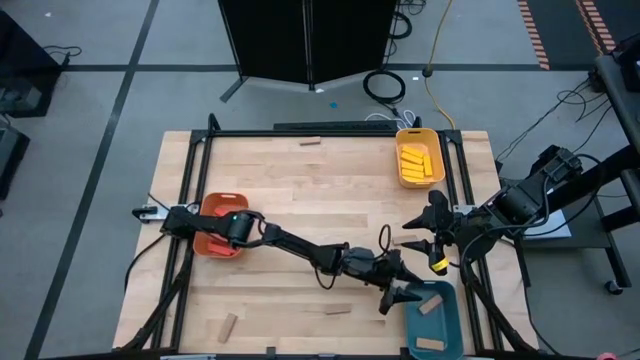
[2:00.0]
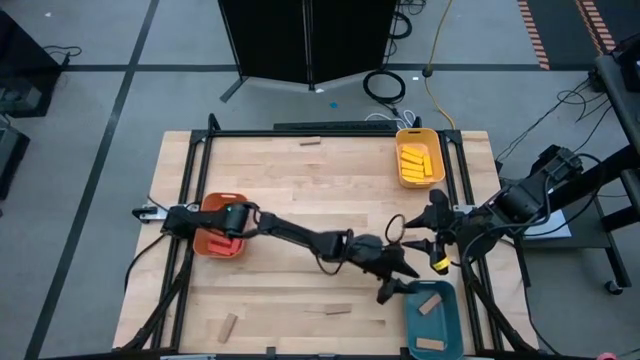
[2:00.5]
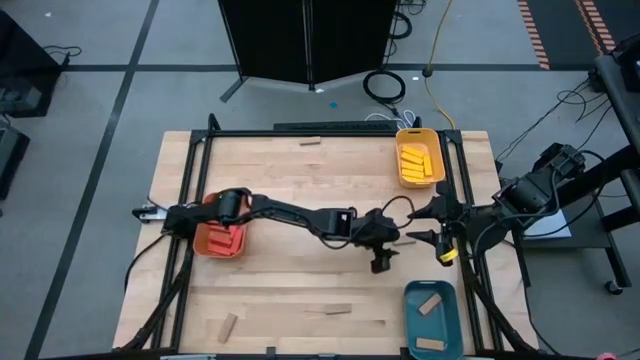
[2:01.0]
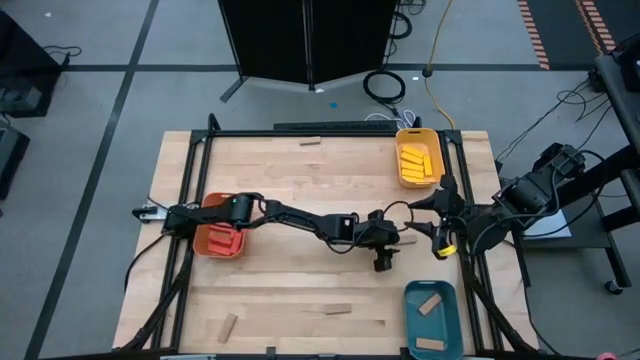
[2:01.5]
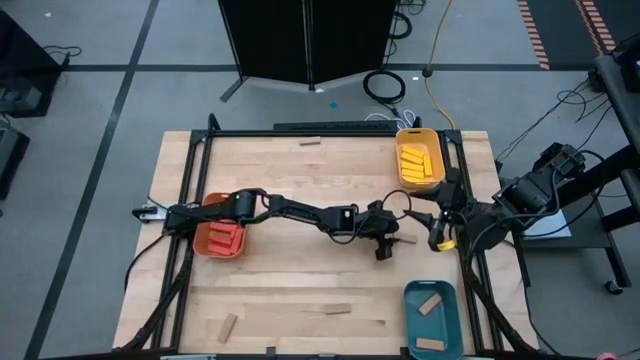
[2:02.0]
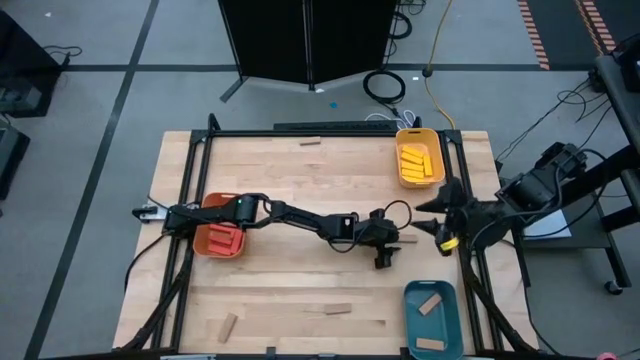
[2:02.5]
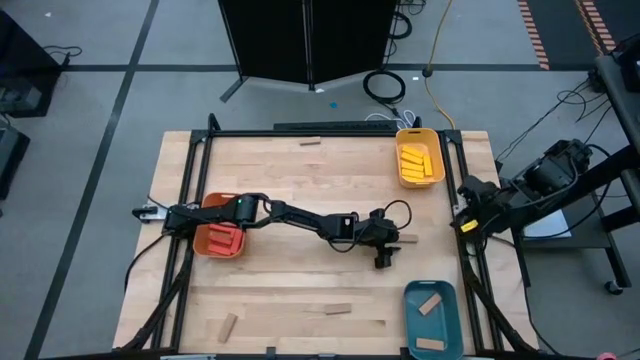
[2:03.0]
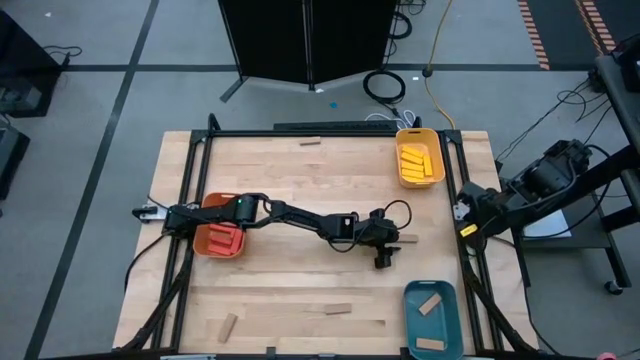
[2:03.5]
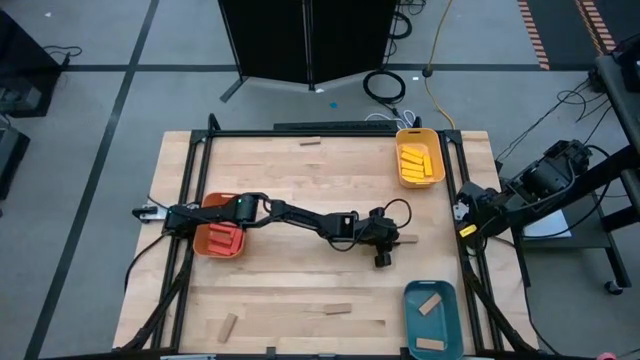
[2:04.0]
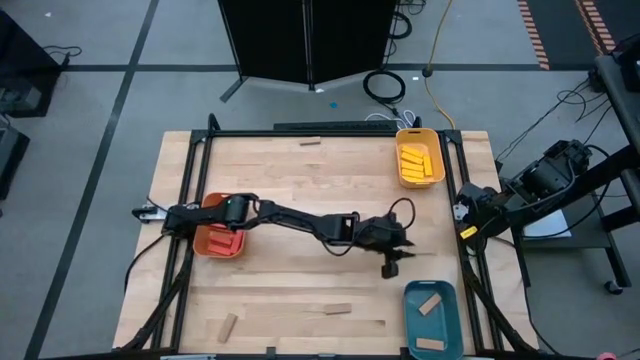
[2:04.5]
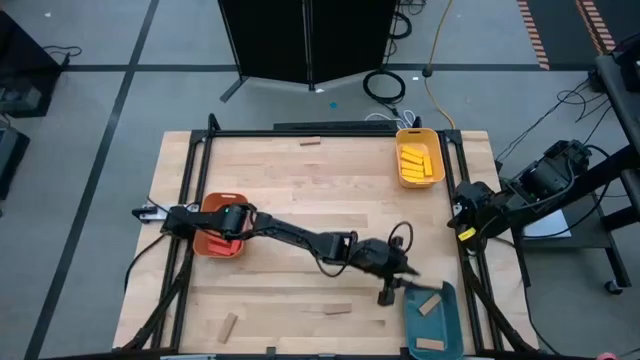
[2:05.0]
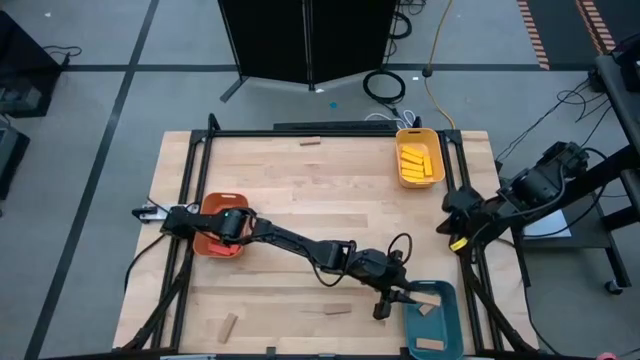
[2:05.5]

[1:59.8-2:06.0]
Task: Sort blocks
Put the brown block into the blue bin

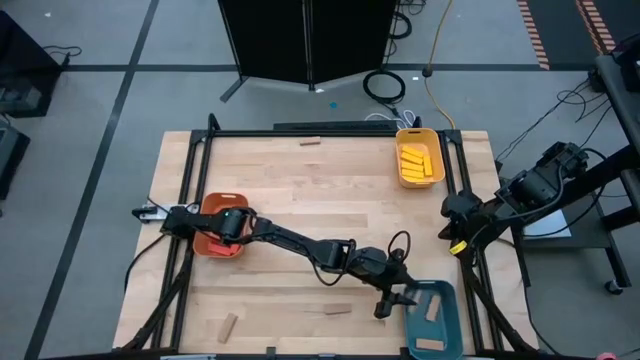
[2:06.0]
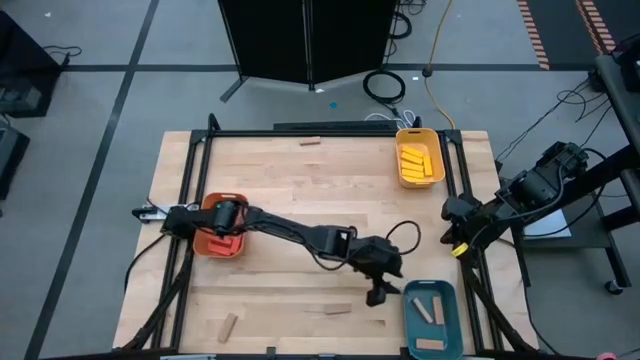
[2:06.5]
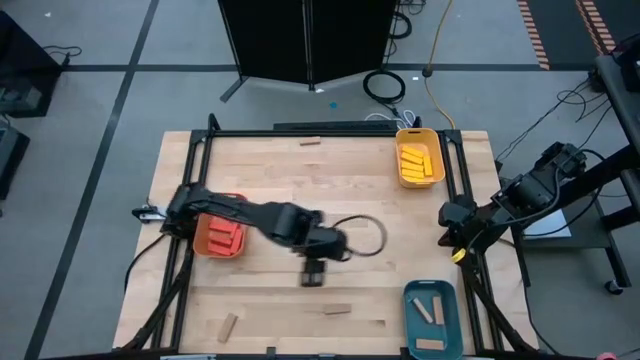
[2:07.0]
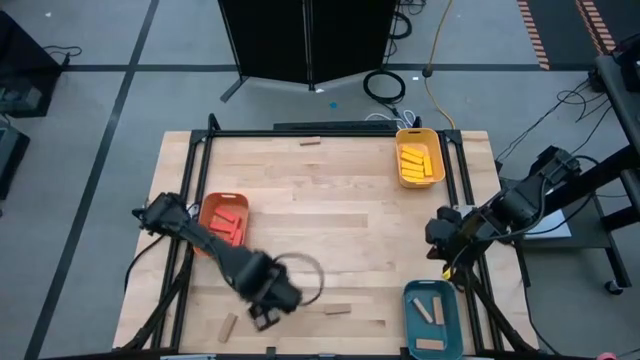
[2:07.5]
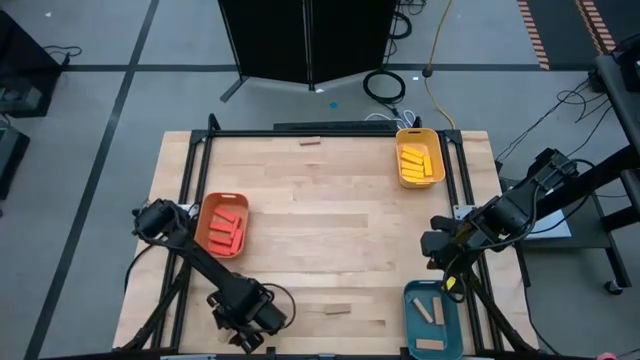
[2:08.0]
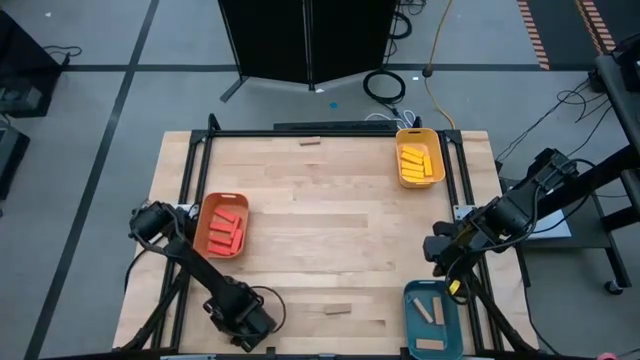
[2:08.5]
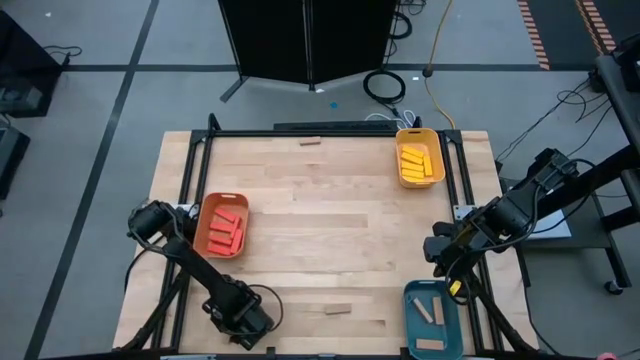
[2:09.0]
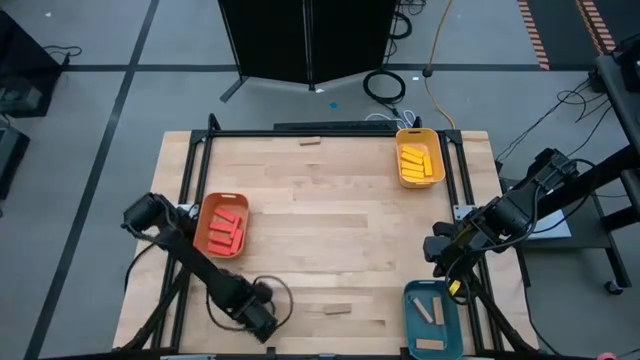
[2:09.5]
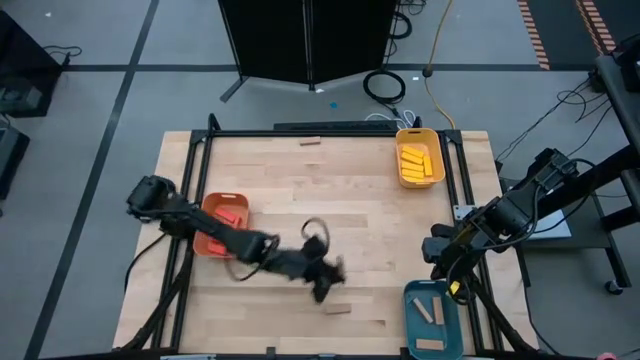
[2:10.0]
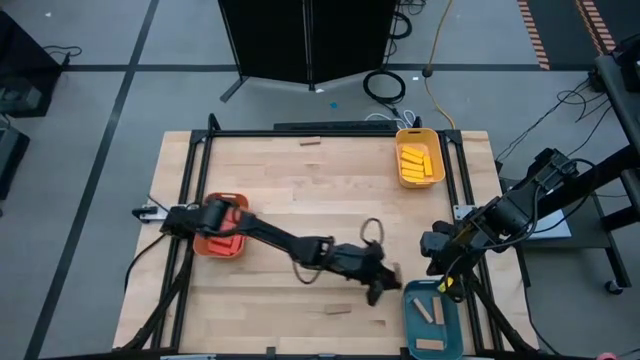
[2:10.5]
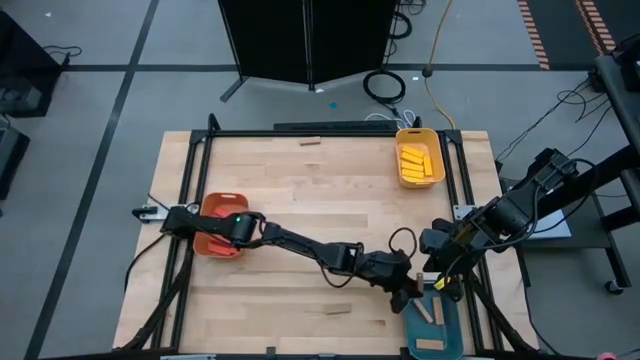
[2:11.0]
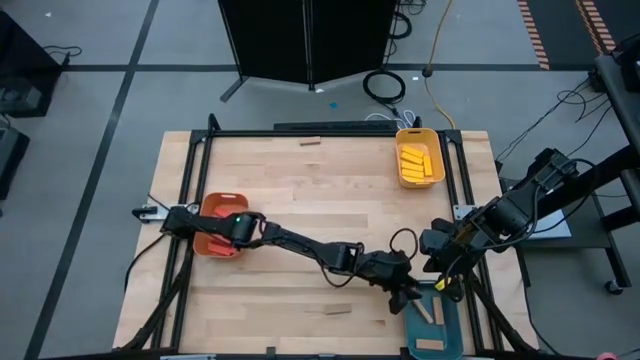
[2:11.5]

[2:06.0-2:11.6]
Put the brown block into the blue bin

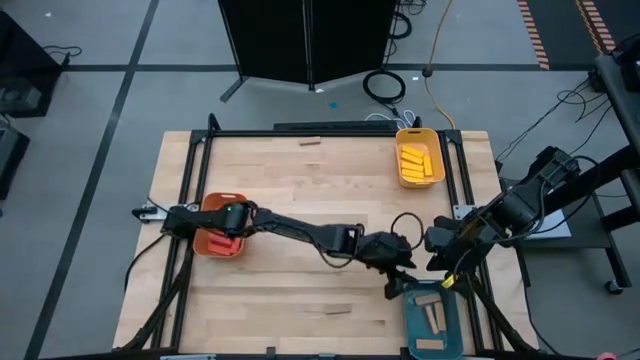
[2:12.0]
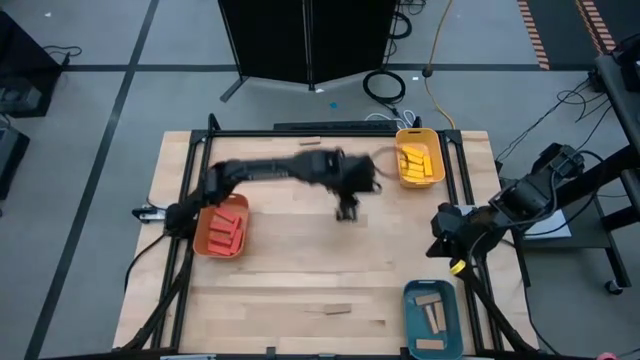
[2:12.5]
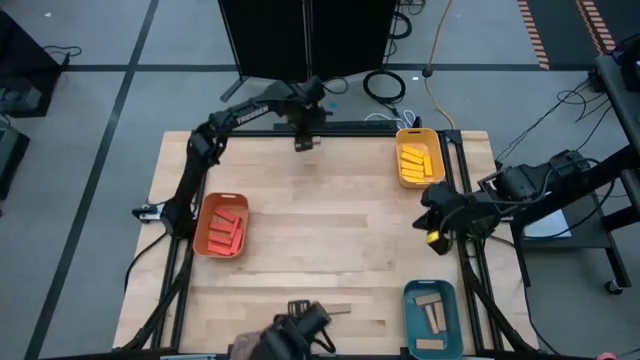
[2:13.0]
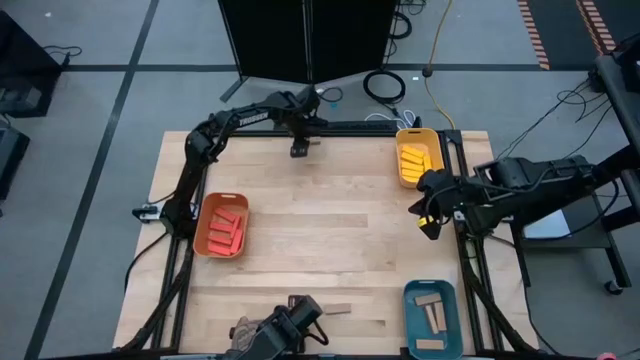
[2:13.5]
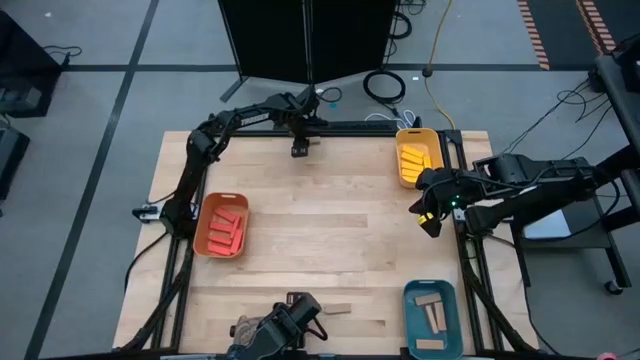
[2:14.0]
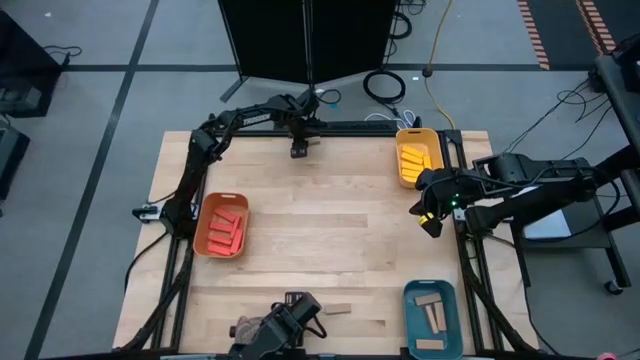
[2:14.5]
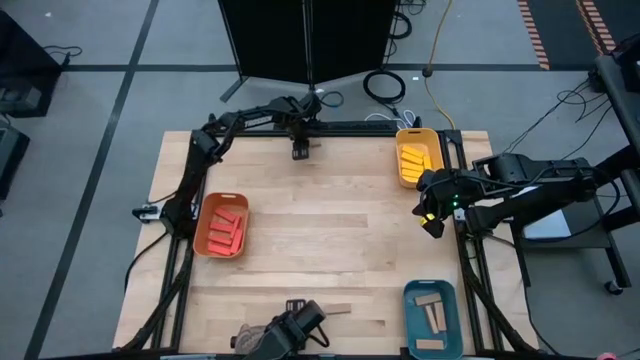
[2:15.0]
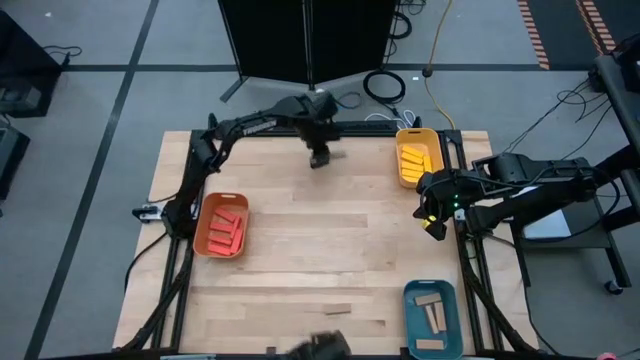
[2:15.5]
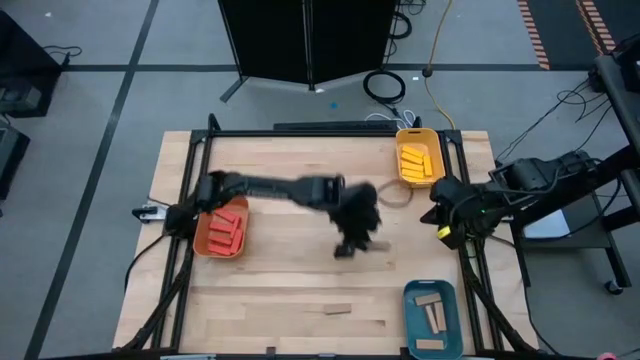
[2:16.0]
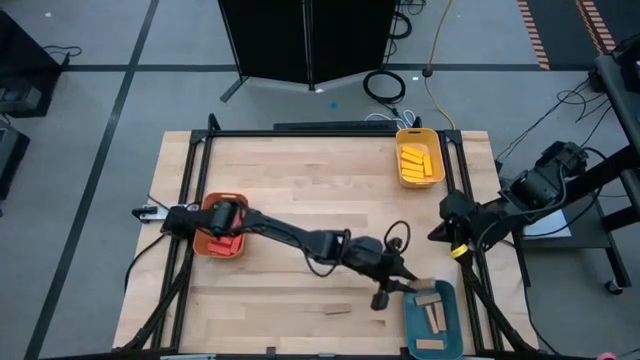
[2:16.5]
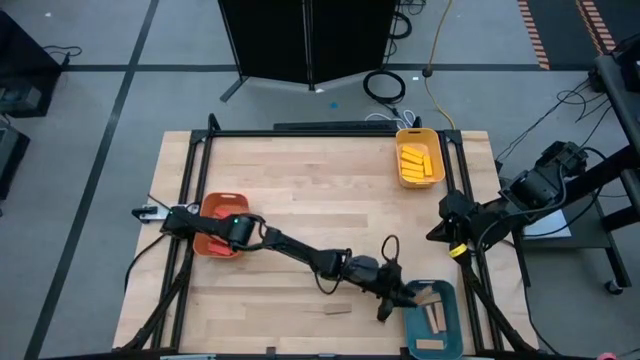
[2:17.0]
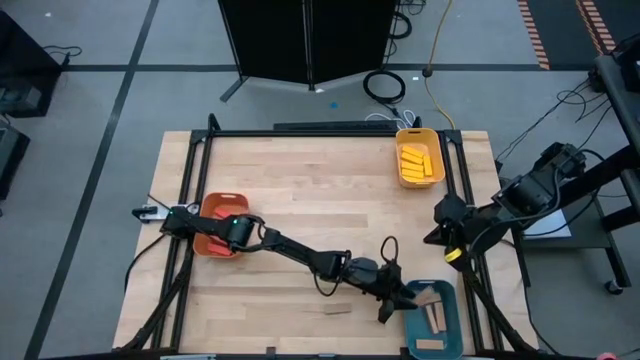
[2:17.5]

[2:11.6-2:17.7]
Put the brown block into the blue bin

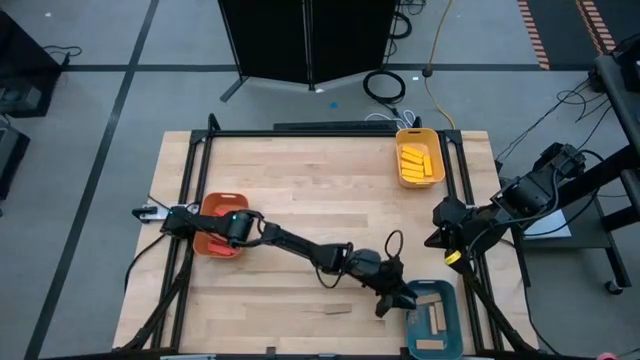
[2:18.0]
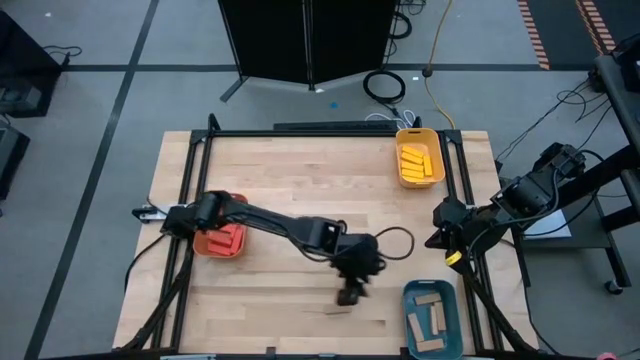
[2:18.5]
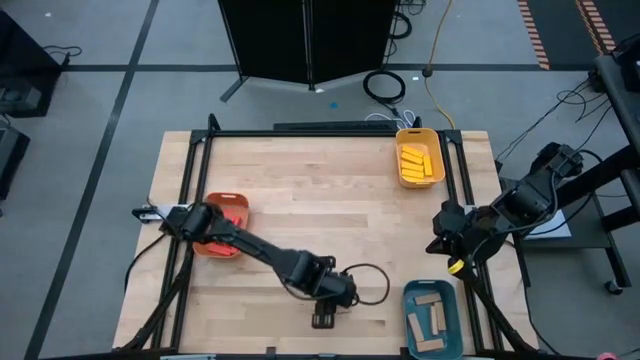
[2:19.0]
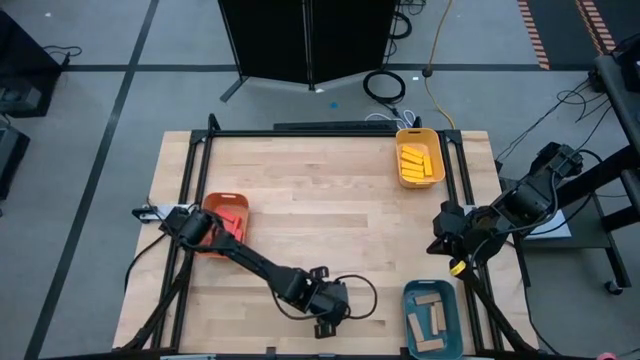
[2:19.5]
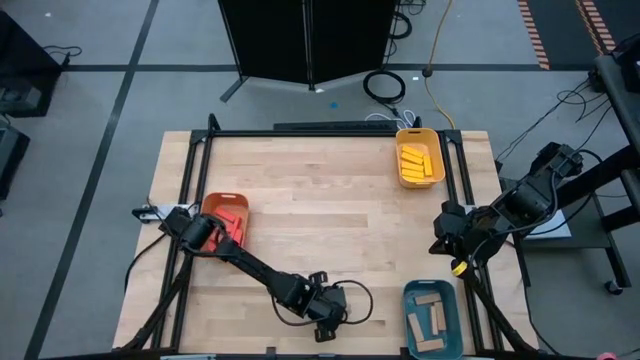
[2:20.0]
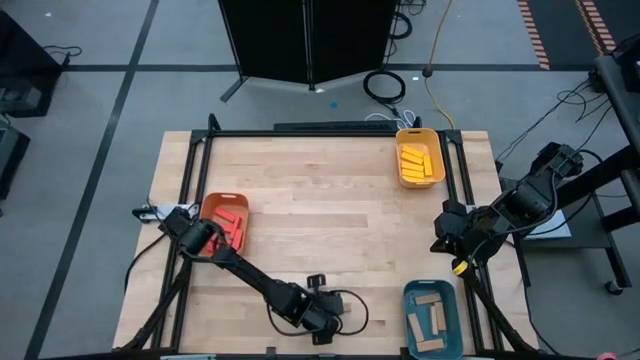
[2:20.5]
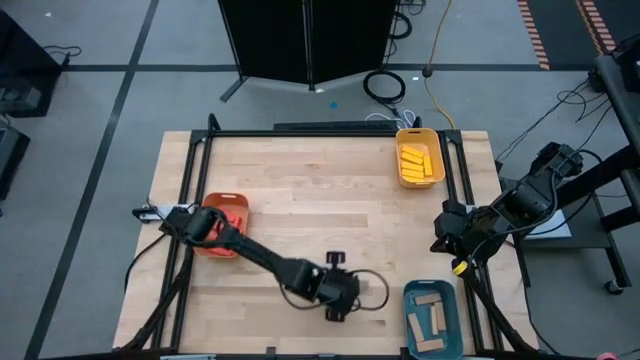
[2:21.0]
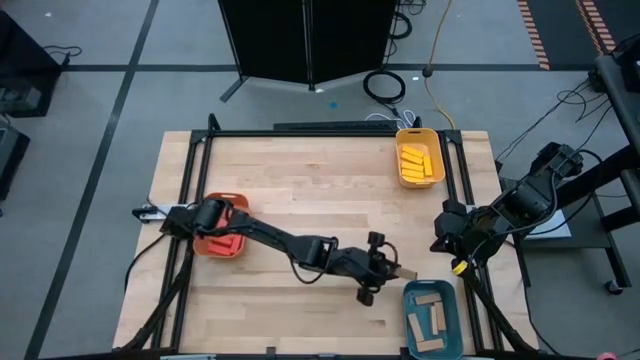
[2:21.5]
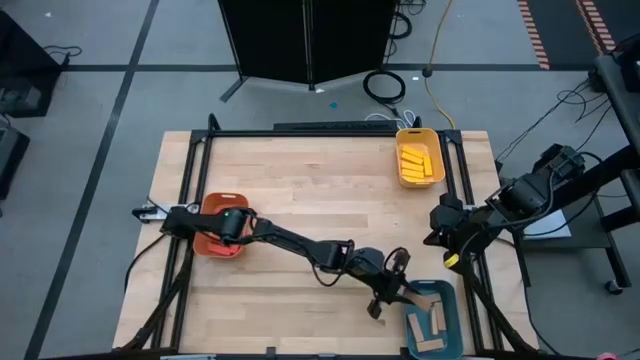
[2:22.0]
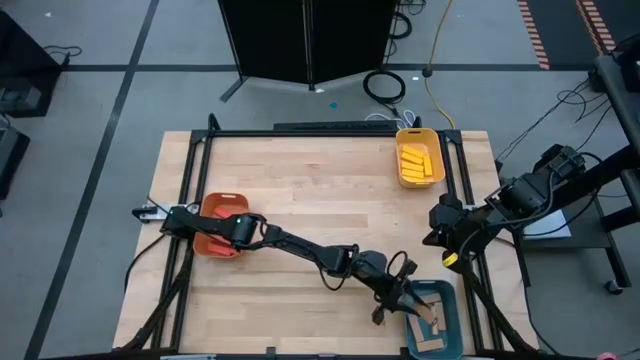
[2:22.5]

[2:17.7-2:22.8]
Put the brown block into the blue bin
